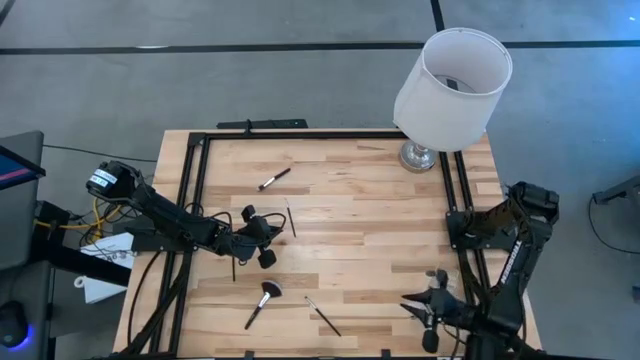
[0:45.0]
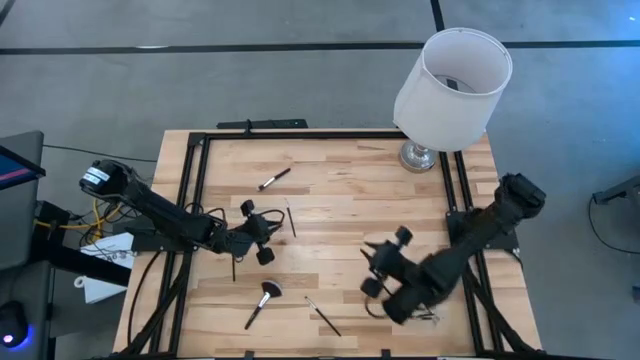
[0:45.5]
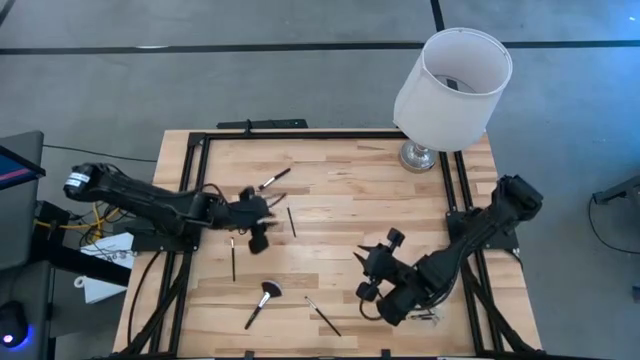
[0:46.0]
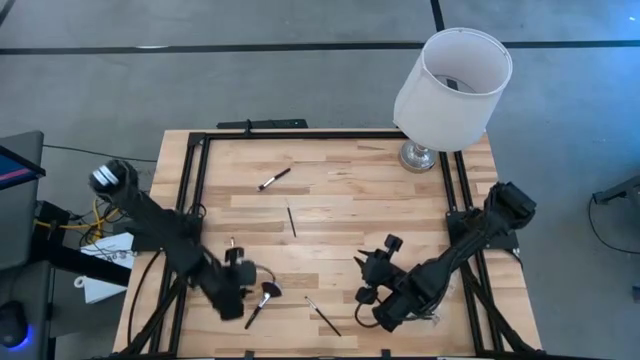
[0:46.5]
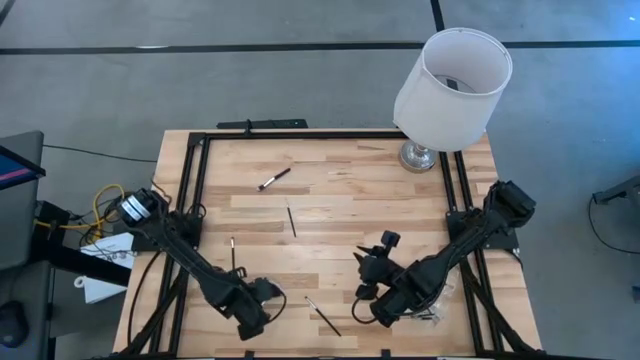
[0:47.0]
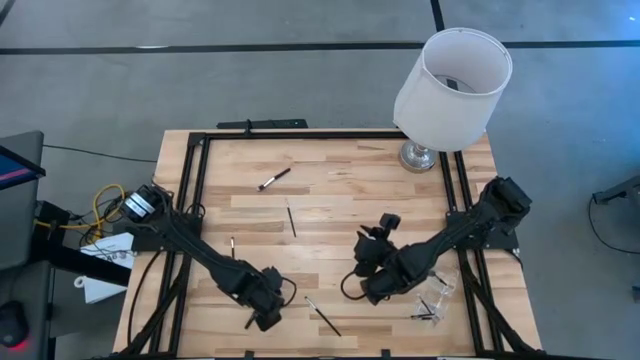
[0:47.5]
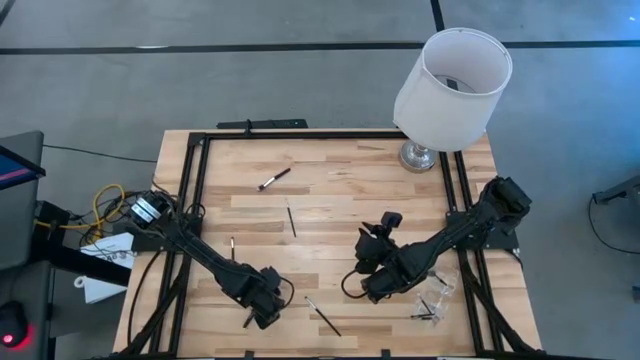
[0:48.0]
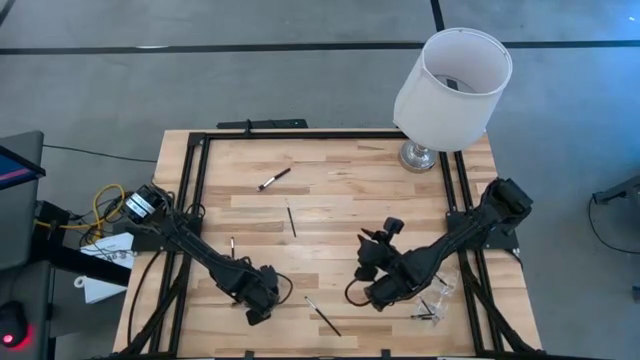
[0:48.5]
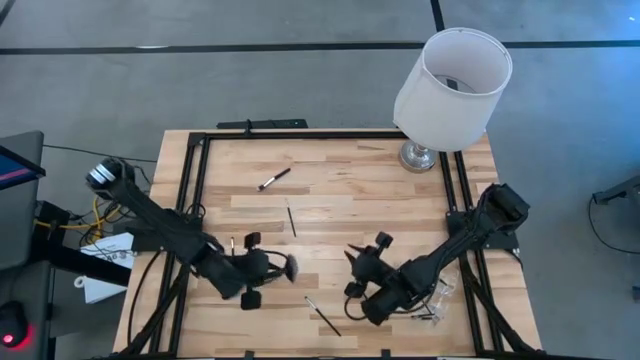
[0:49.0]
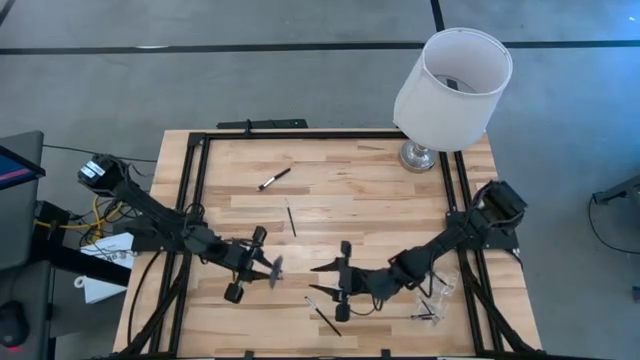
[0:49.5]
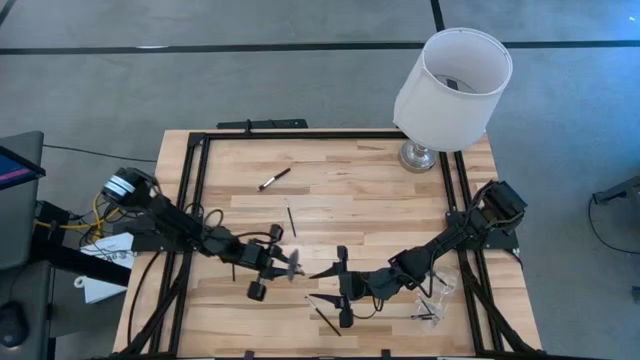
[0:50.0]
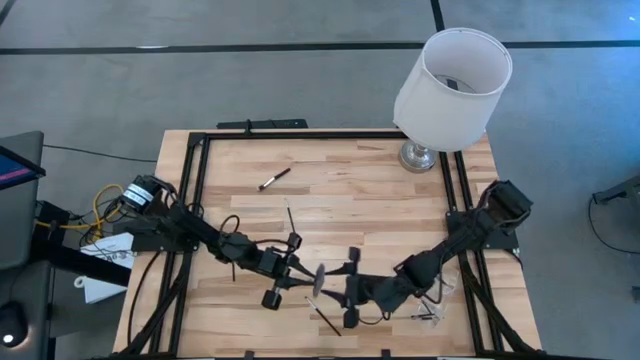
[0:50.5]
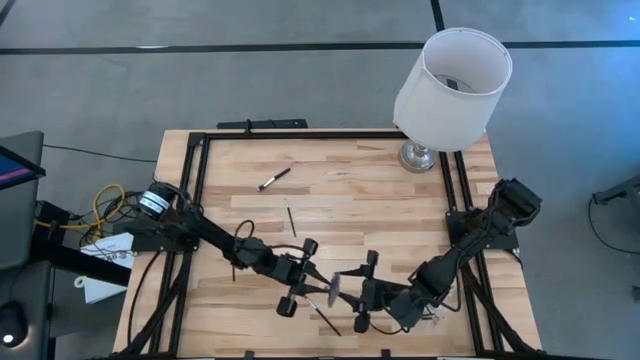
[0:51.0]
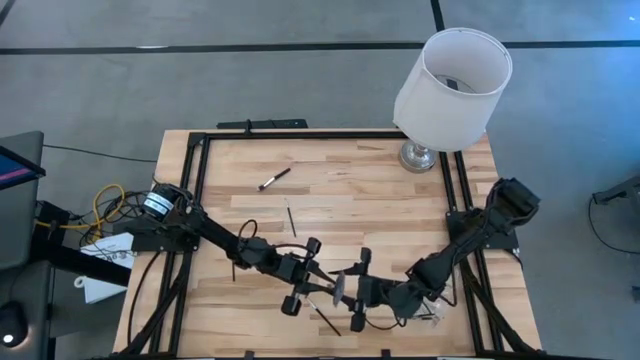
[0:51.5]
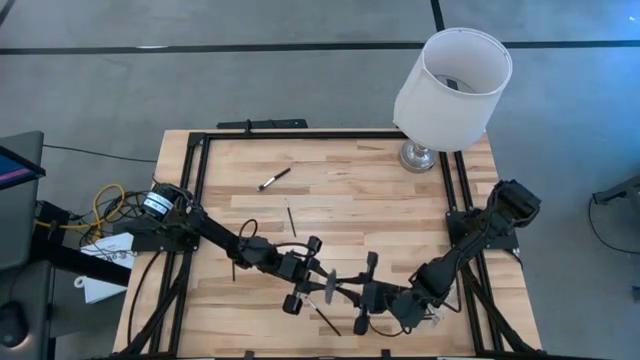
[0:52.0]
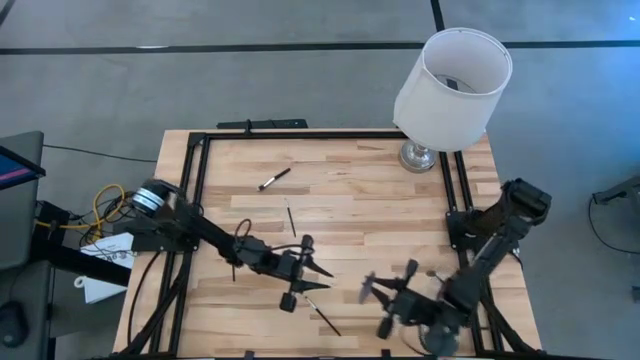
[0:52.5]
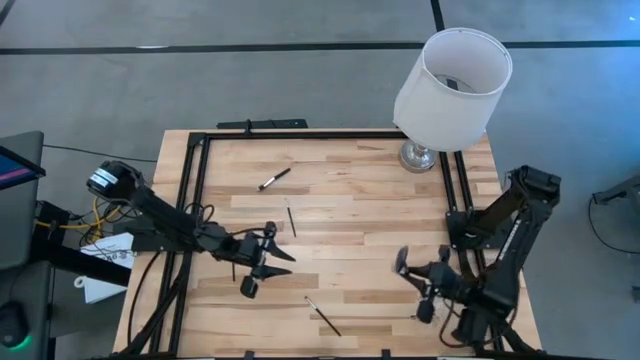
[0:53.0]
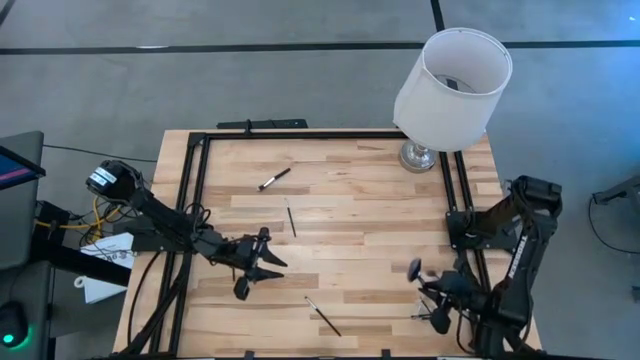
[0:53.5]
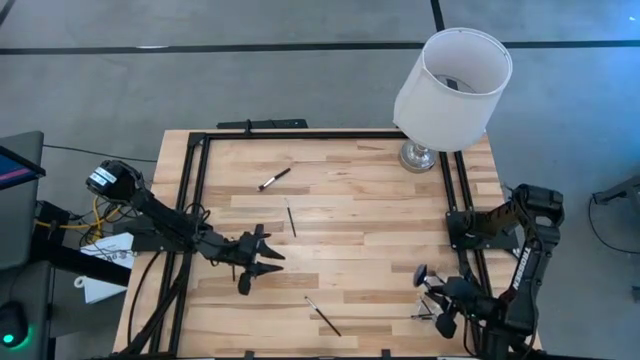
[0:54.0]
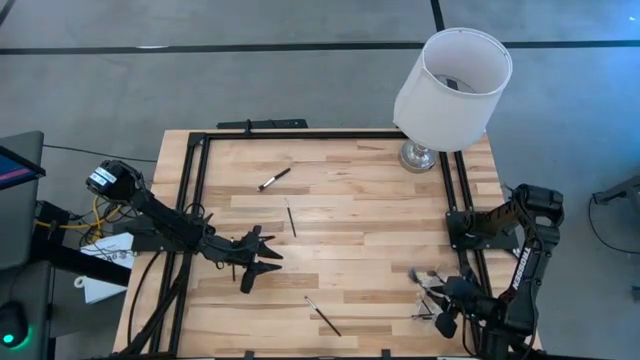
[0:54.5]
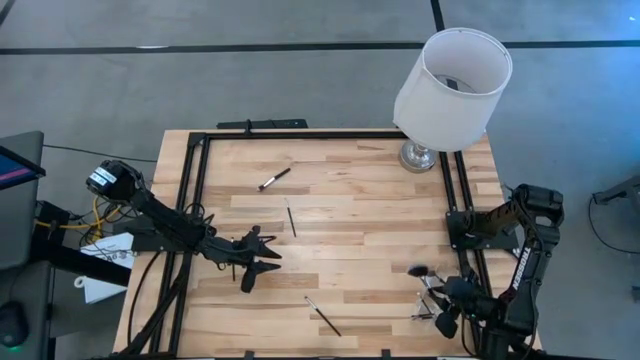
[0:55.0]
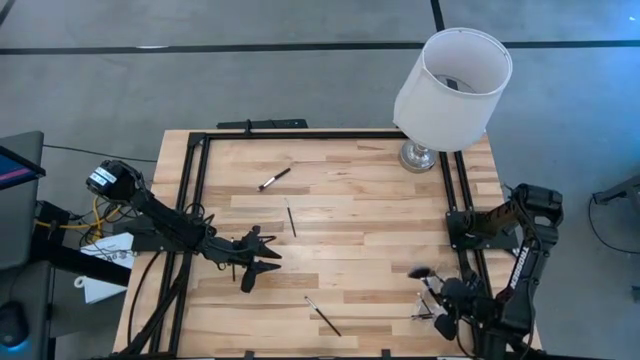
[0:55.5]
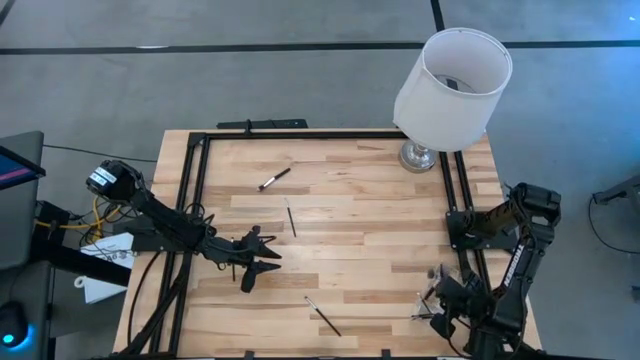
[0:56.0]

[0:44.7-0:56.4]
Task: Pick & Place Makeup Brushes
Put the black highlighter brush into the transparent organizer

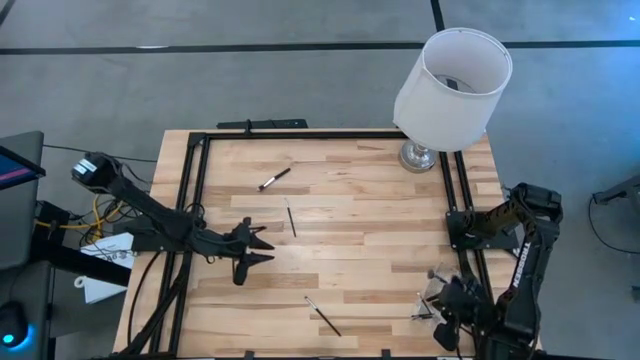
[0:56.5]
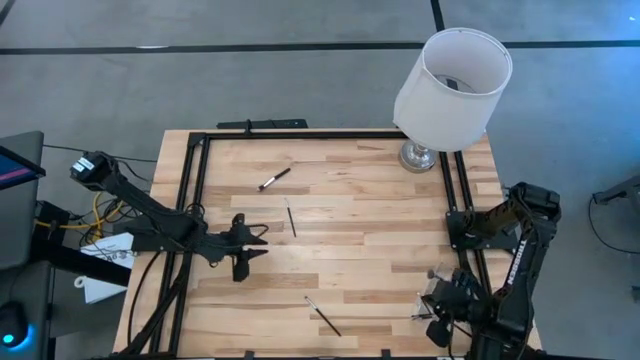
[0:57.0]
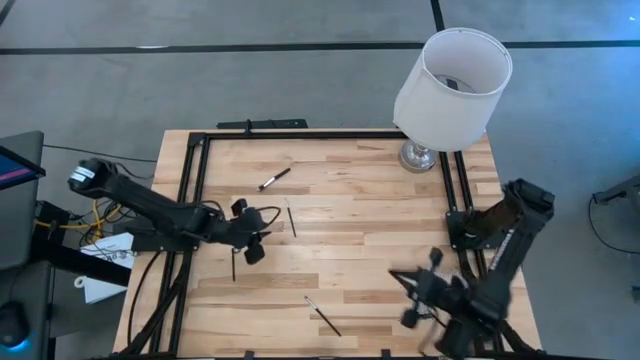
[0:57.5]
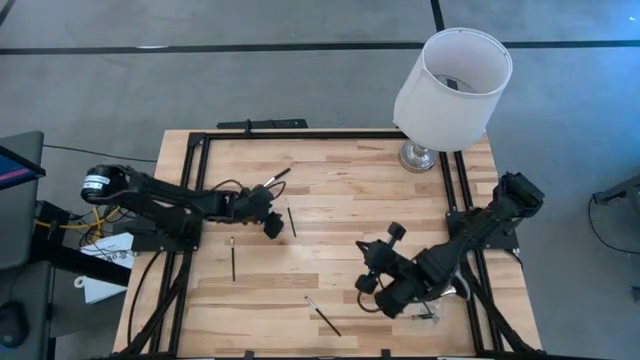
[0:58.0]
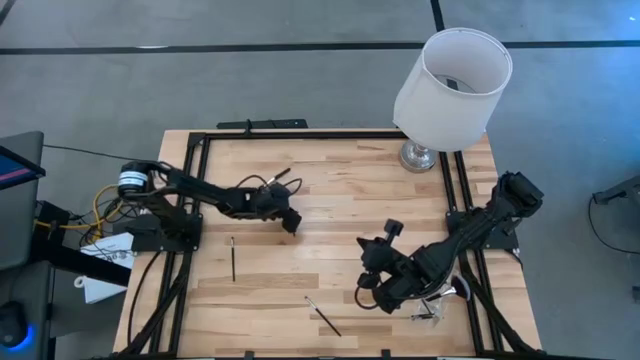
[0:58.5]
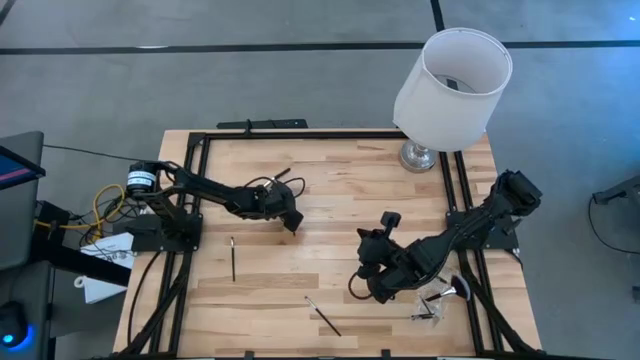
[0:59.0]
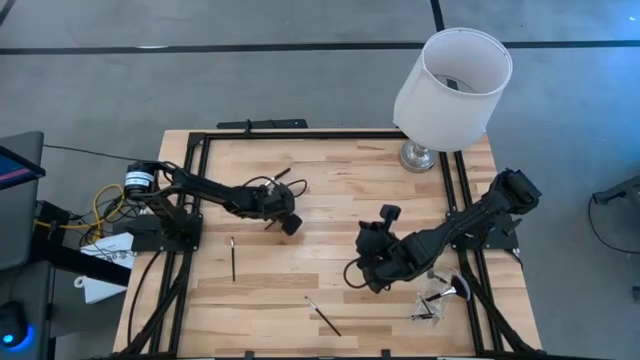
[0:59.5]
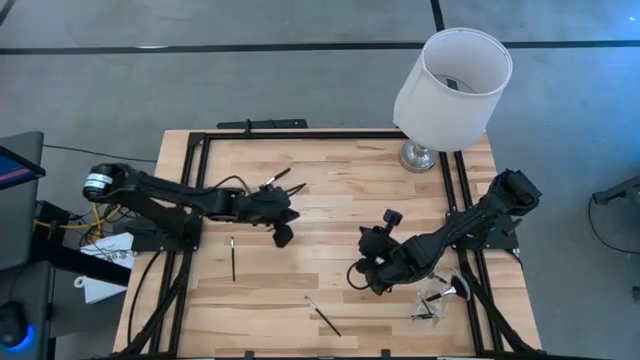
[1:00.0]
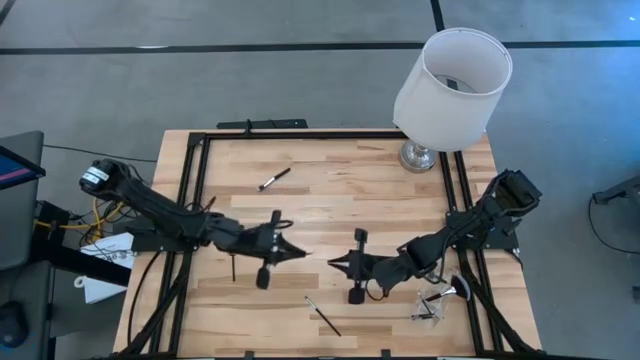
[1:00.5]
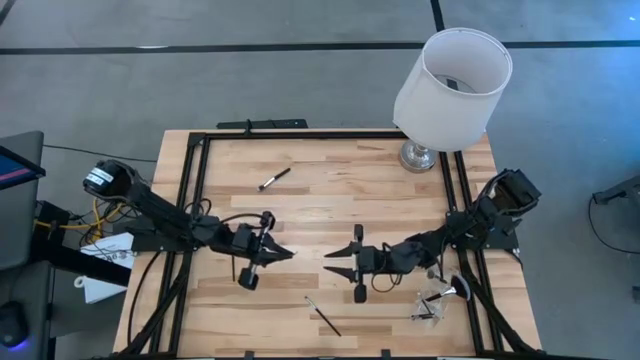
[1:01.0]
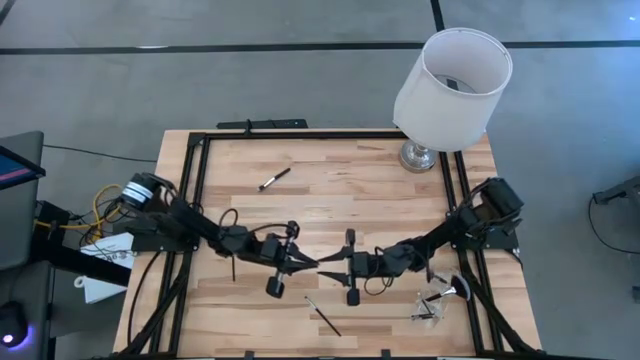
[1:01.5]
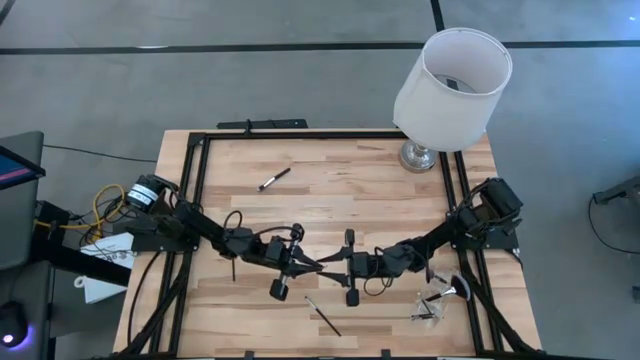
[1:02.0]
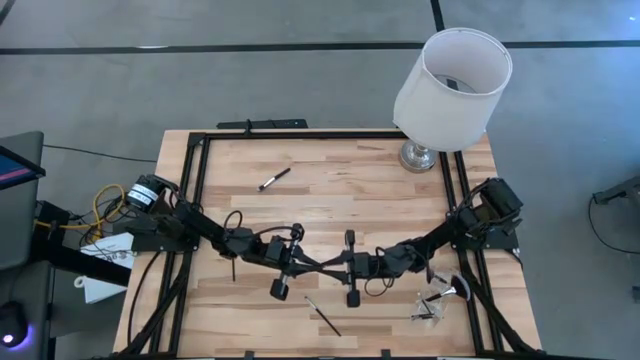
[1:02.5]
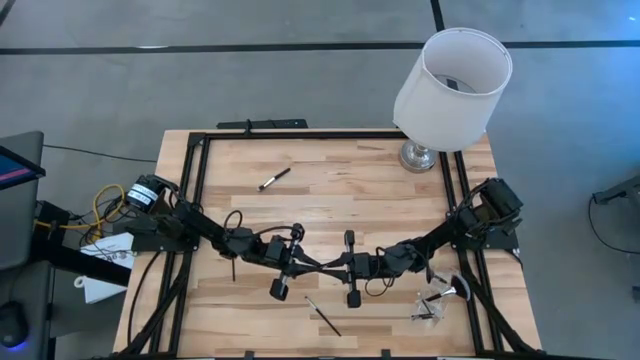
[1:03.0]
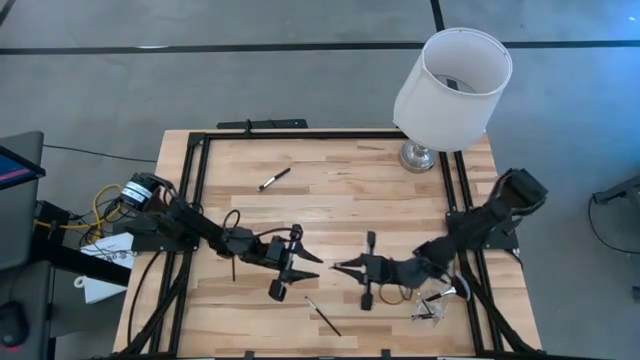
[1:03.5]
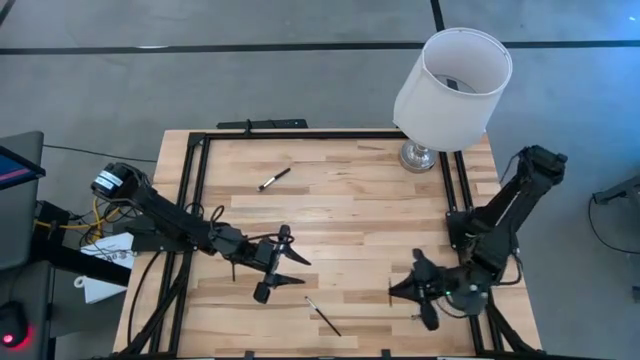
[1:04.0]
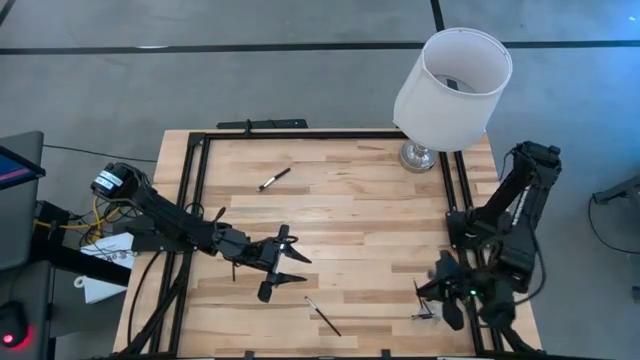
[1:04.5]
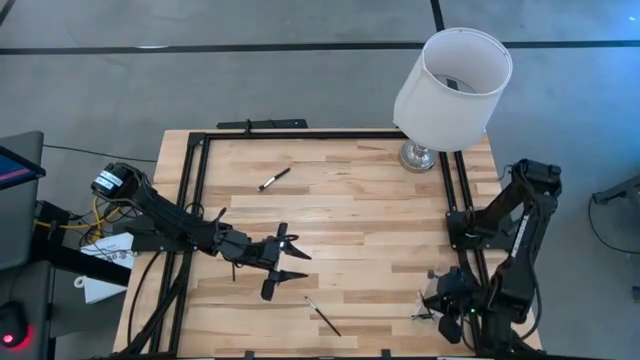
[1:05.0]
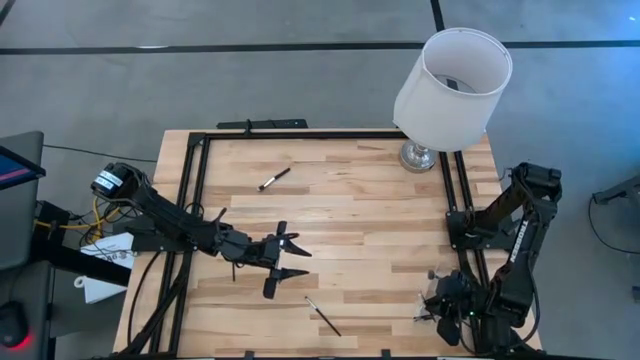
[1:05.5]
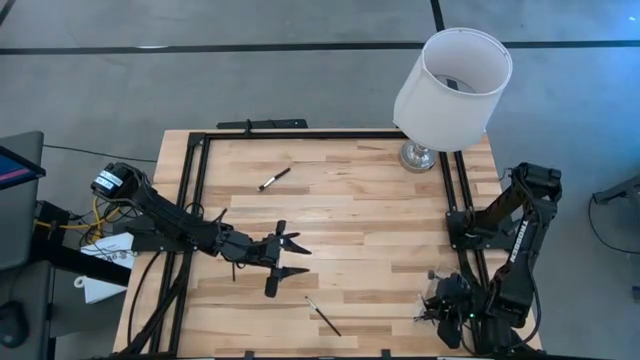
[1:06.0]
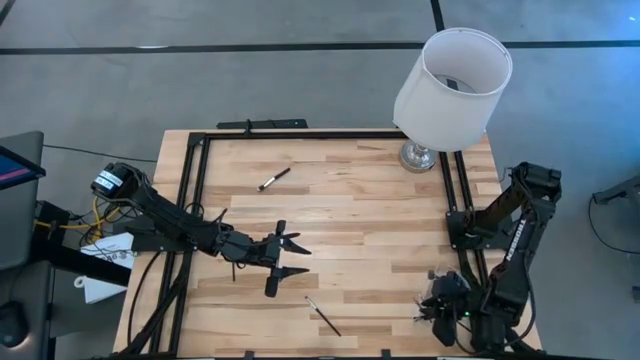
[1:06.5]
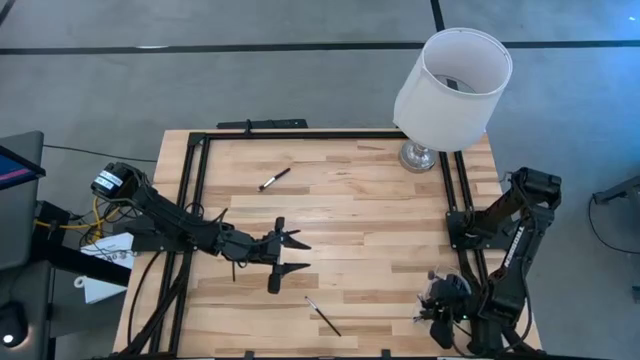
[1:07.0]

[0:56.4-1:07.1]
Put the black liner brush into the transparent organizer
